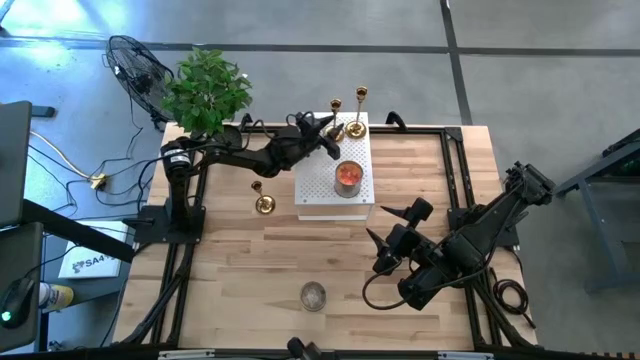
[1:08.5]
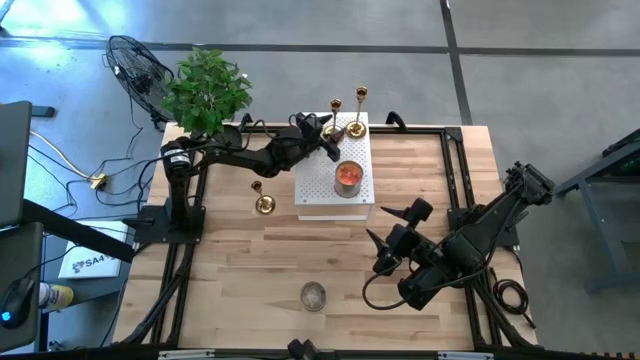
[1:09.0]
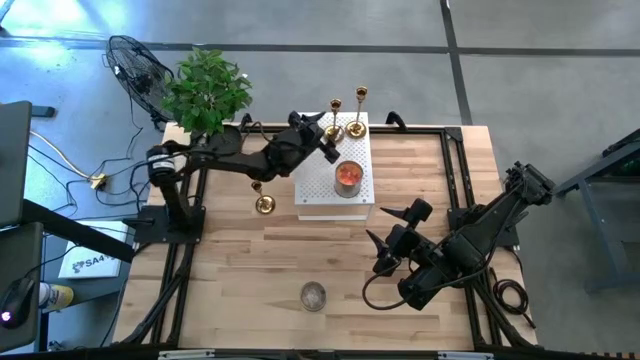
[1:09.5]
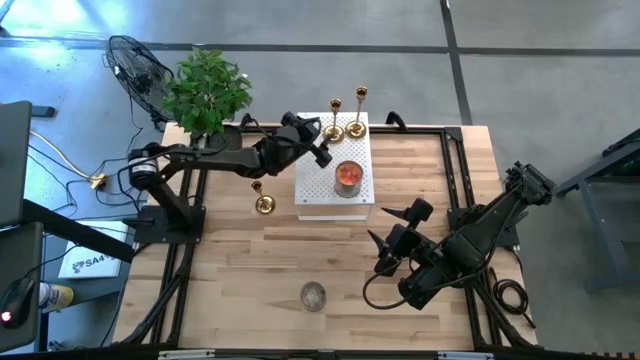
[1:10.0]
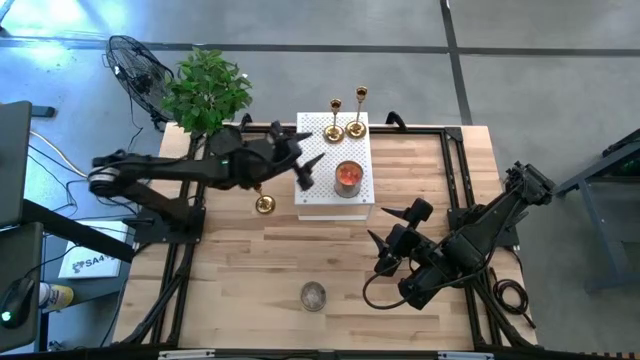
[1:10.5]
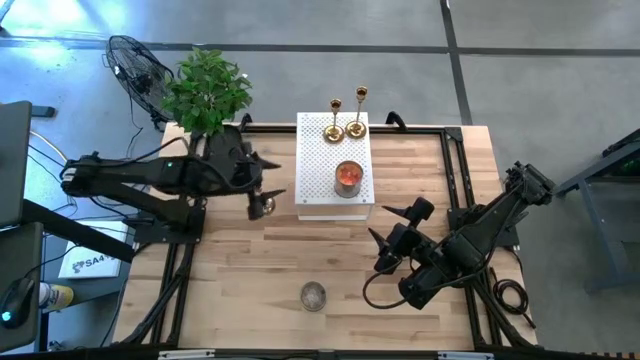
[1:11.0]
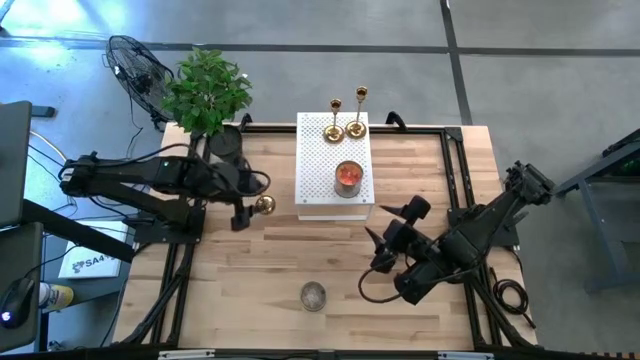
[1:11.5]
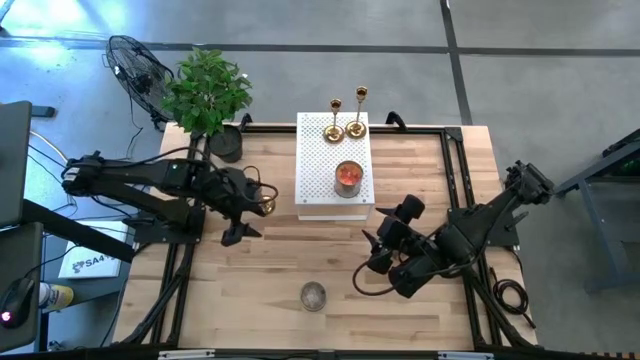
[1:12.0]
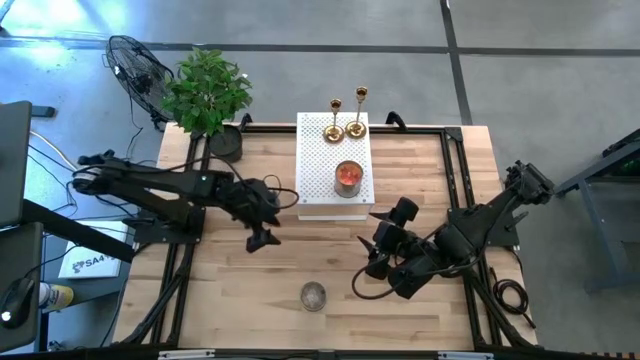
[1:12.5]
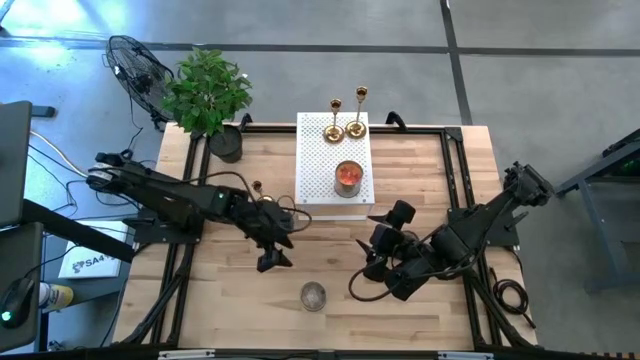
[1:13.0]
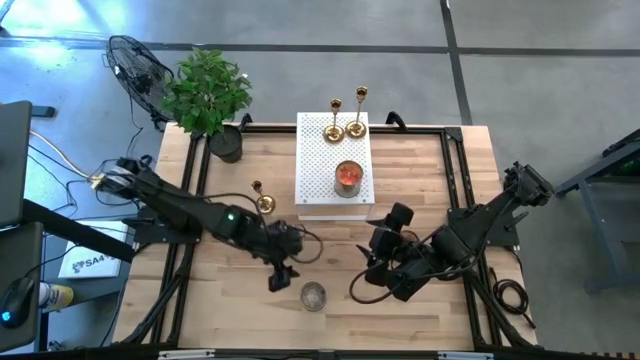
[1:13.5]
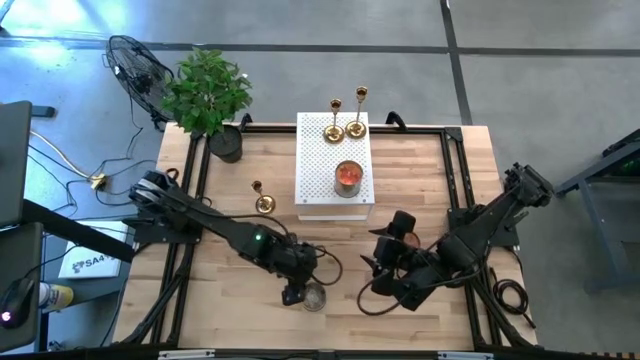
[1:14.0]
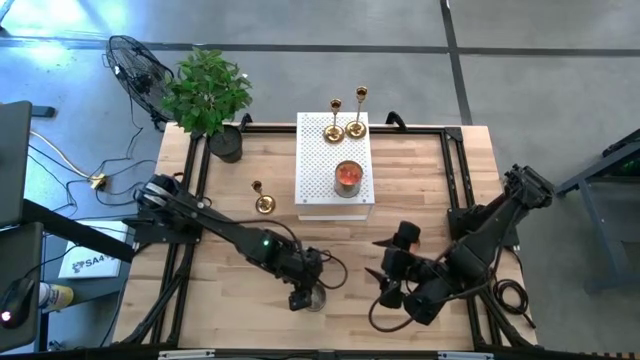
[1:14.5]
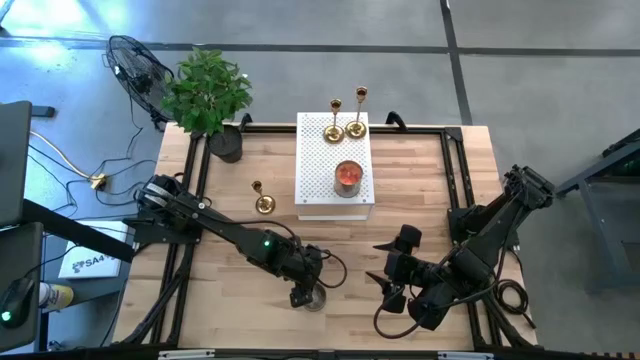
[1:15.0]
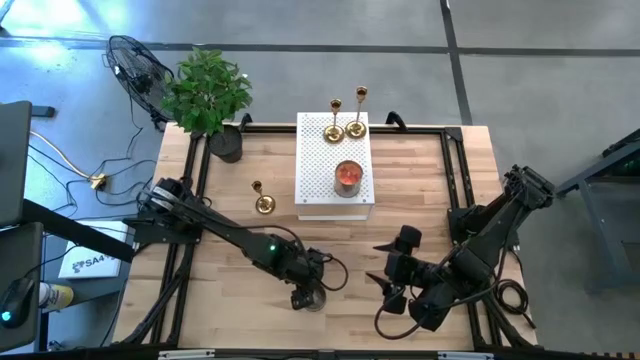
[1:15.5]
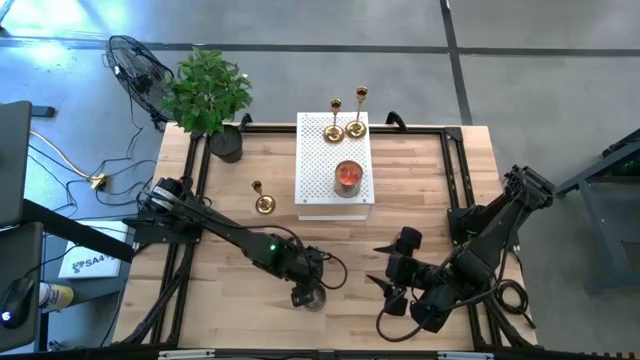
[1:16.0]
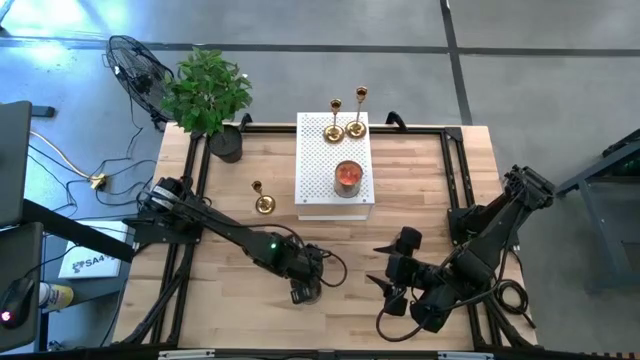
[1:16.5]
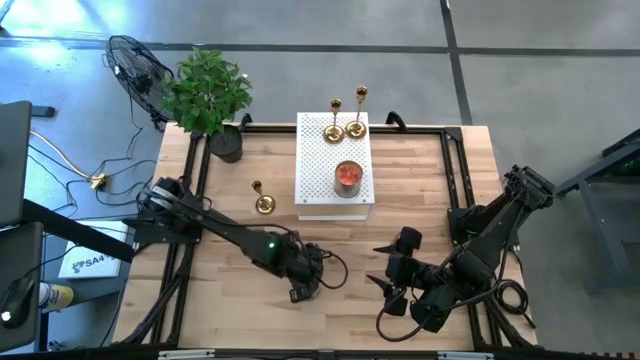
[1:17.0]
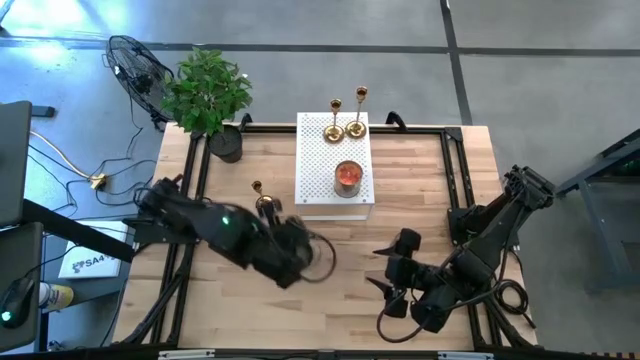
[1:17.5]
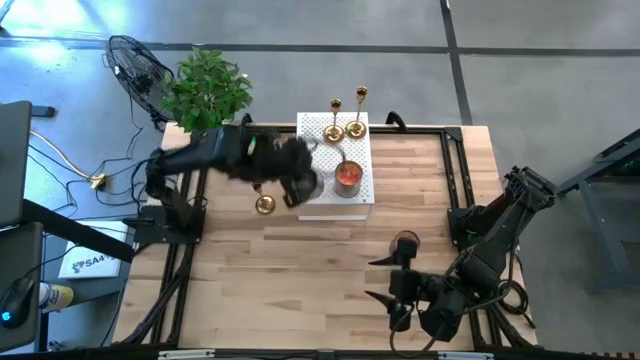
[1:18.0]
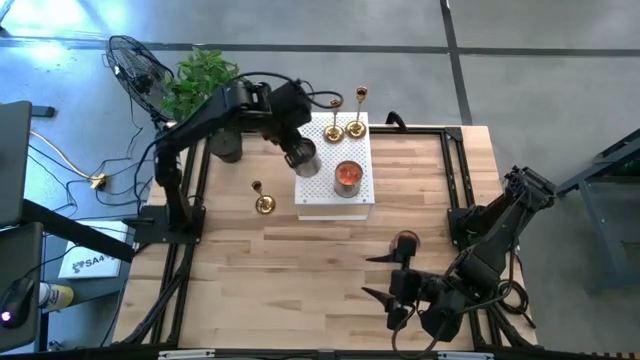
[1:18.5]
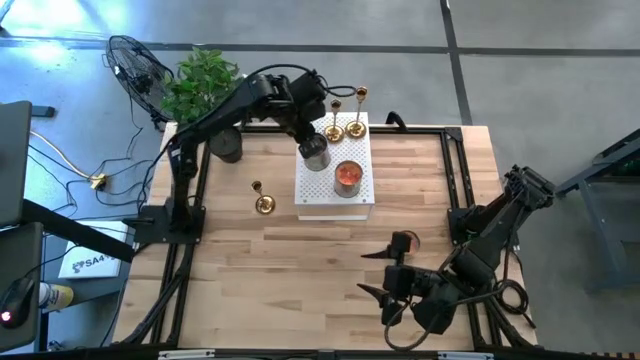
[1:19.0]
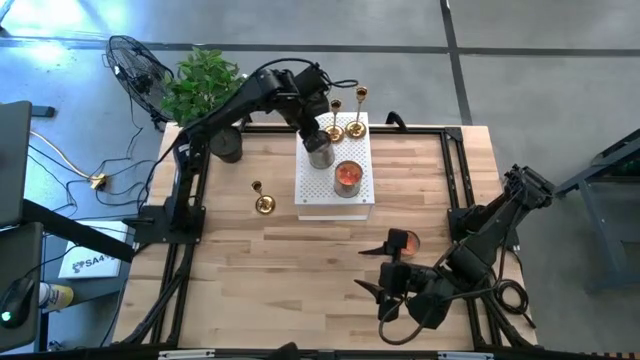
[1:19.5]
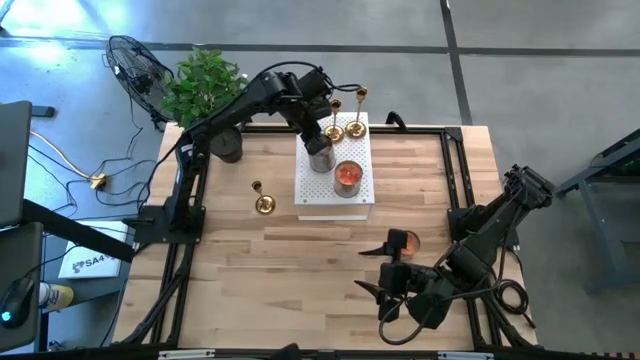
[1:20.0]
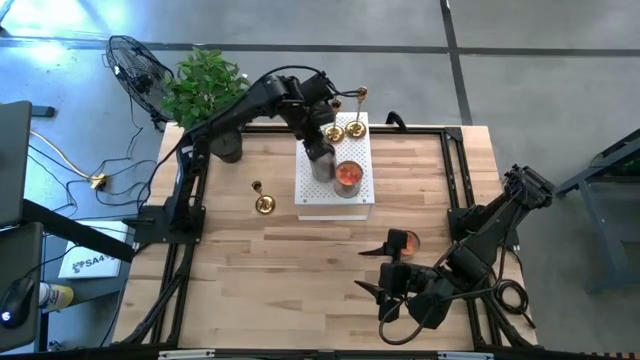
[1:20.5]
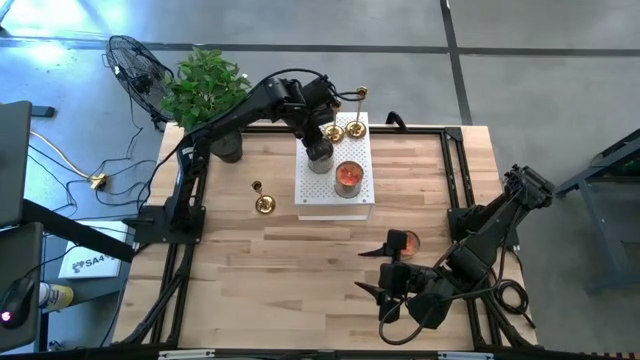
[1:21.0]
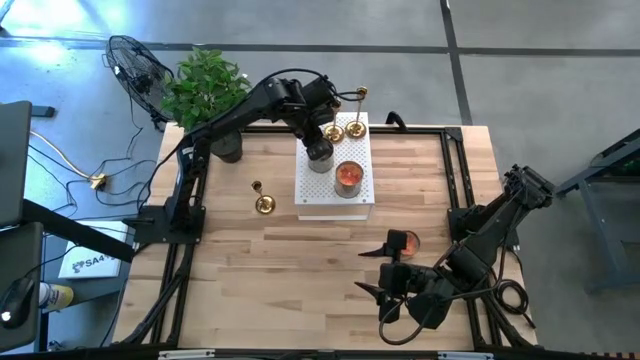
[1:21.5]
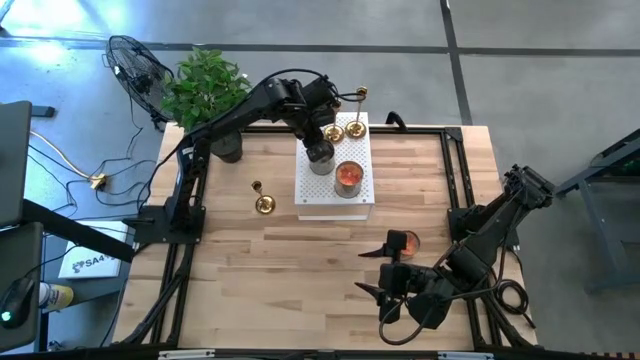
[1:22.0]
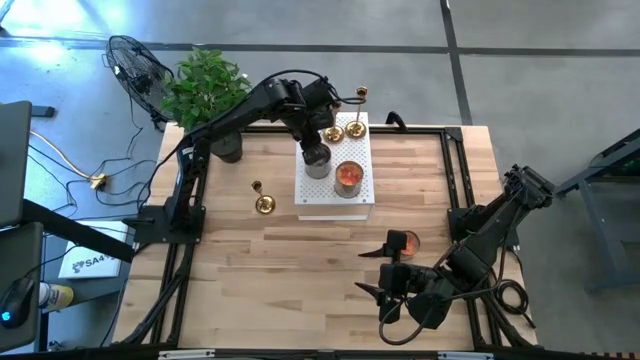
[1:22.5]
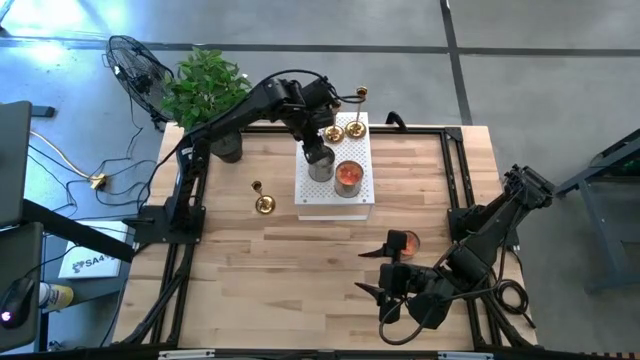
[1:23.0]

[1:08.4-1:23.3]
Task: Pick & Place candle stick holders
Put the bottom middle brown candle on the shelf

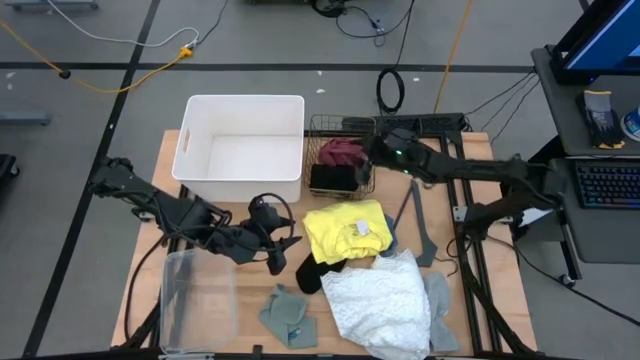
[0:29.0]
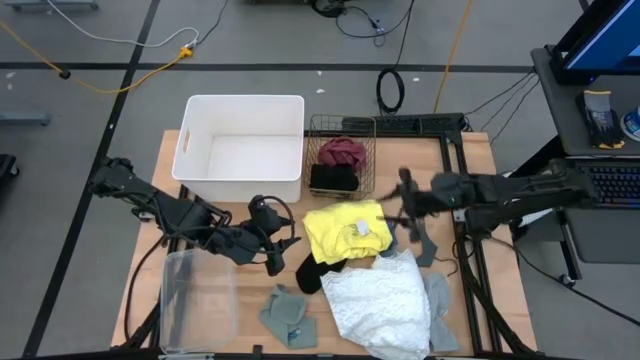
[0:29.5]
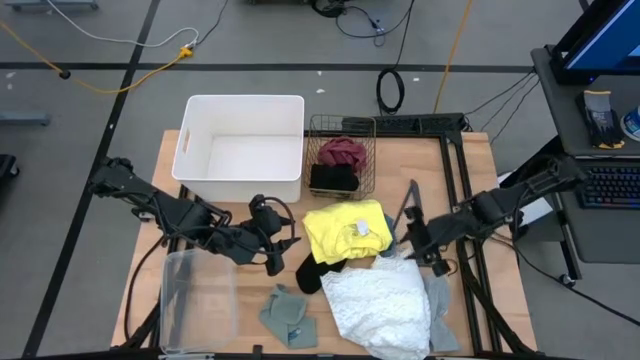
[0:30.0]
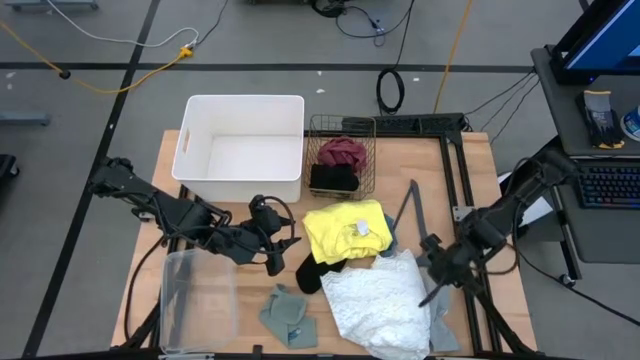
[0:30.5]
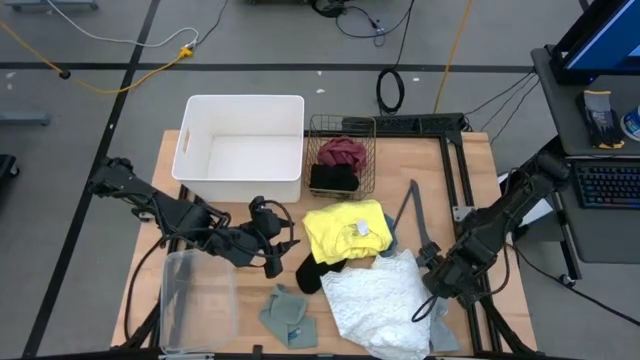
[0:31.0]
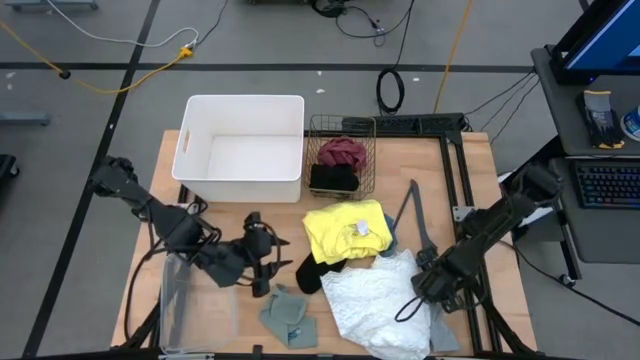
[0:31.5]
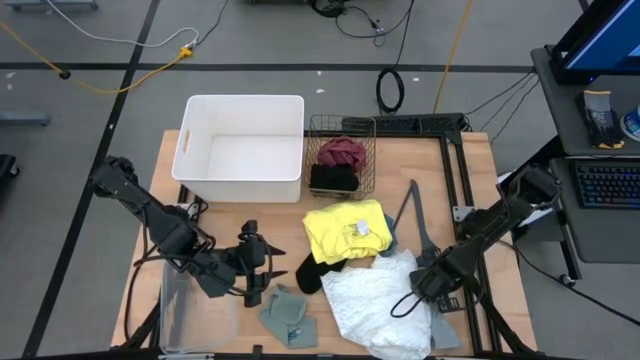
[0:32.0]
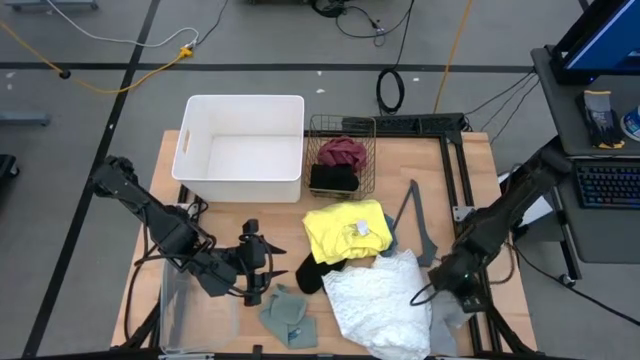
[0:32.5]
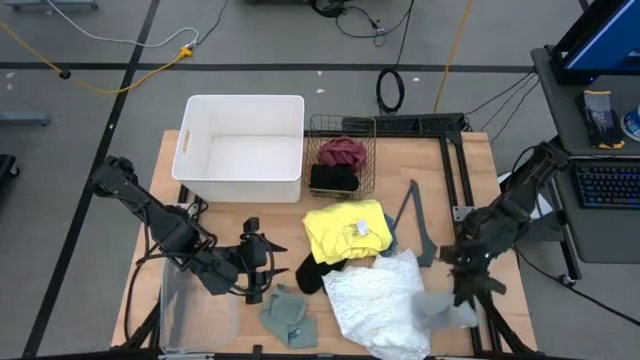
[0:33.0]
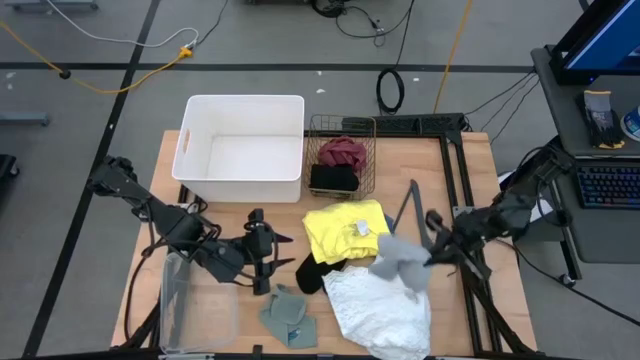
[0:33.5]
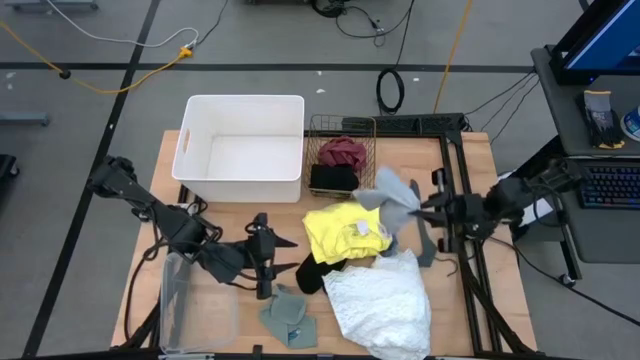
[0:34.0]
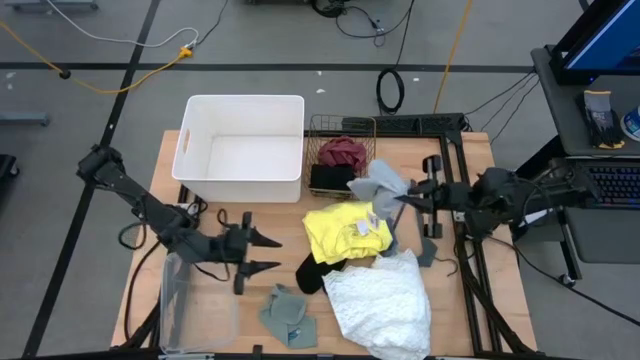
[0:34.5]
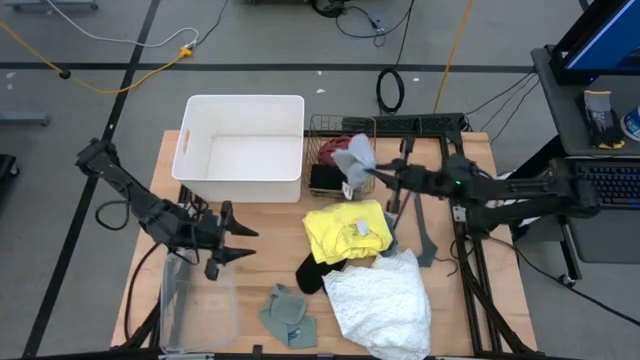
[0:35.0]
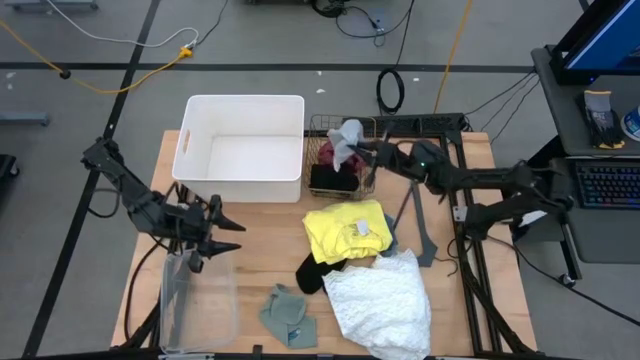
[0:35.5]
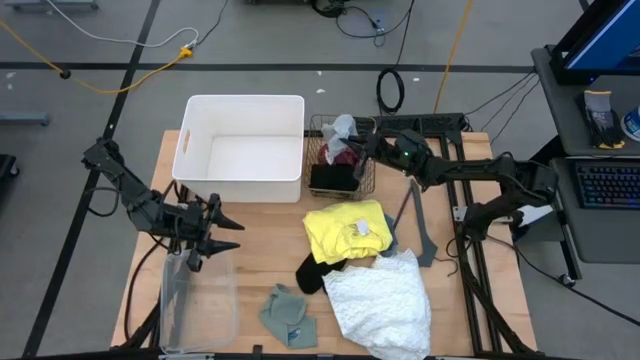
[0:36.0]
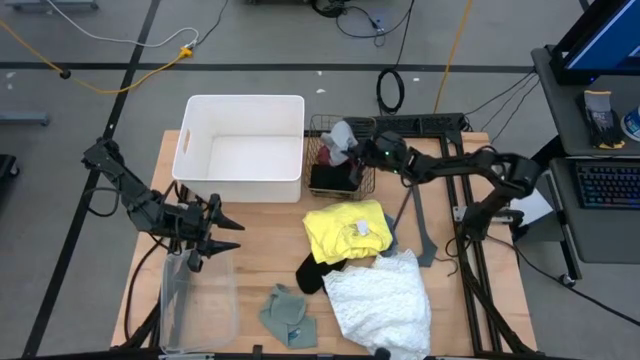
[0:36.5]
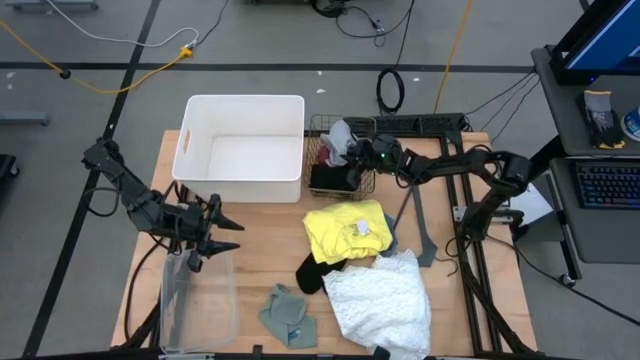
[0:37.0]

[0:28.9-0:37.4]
Task: Pick & Place Cloths
Put the gray pants into the wire basket
